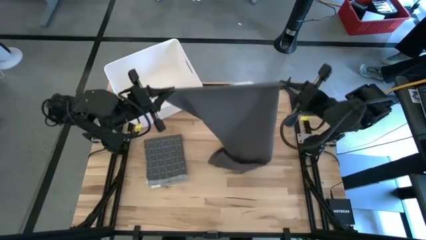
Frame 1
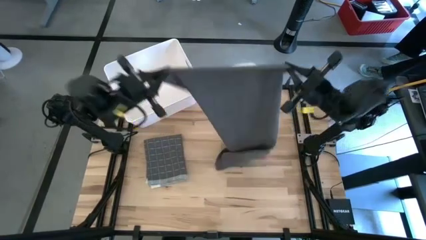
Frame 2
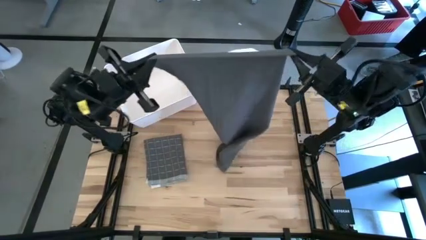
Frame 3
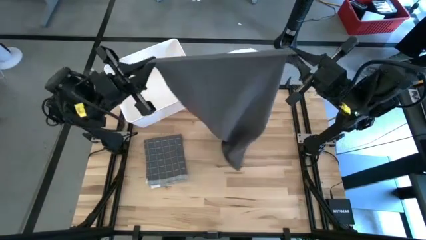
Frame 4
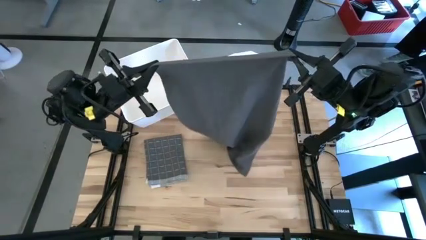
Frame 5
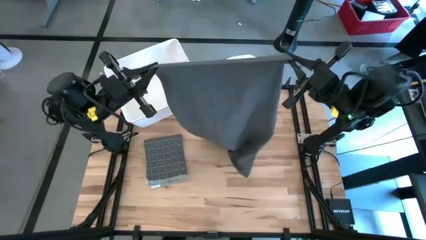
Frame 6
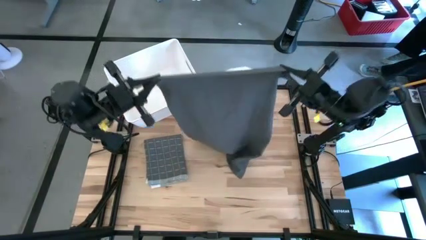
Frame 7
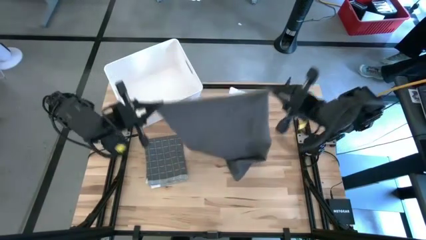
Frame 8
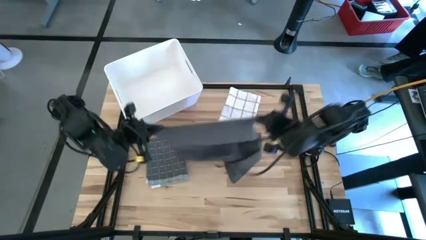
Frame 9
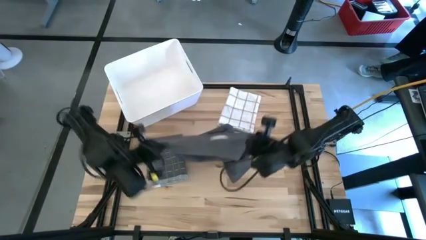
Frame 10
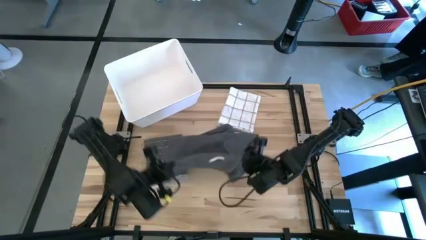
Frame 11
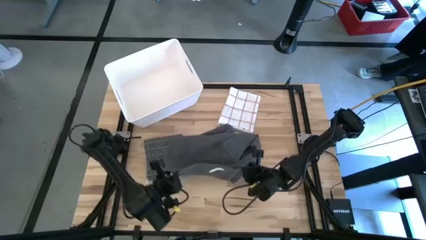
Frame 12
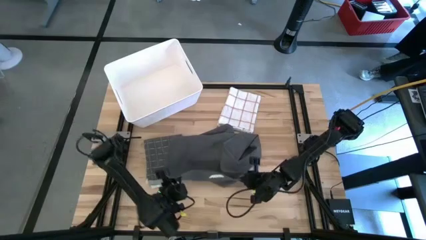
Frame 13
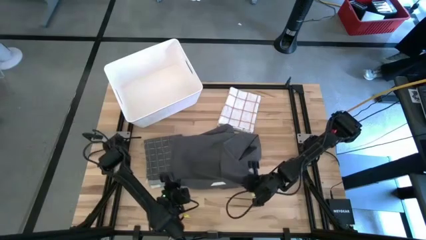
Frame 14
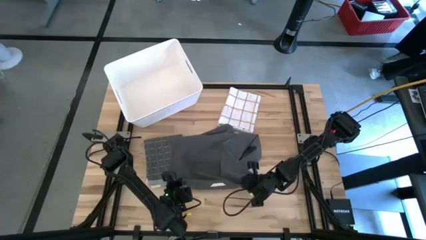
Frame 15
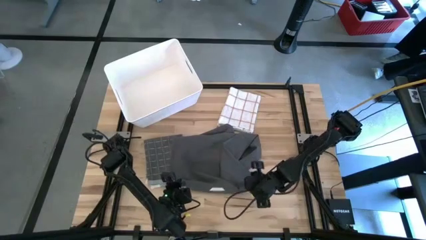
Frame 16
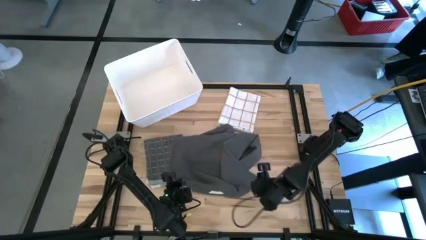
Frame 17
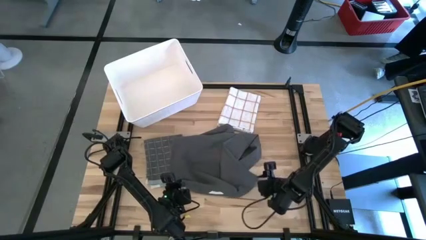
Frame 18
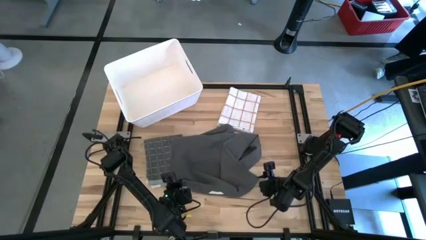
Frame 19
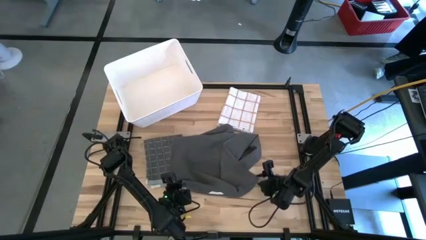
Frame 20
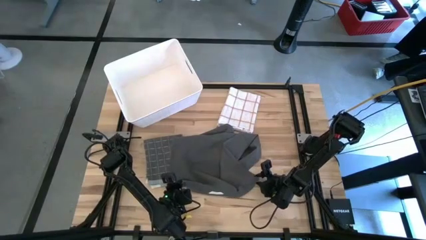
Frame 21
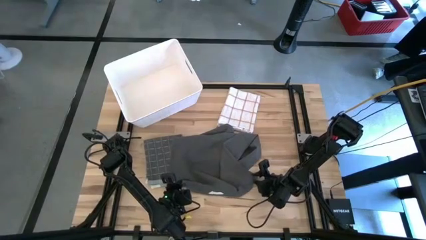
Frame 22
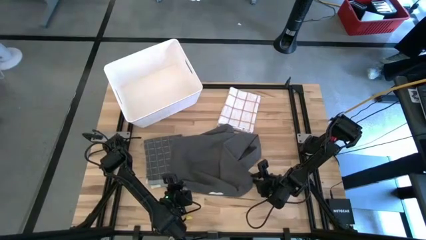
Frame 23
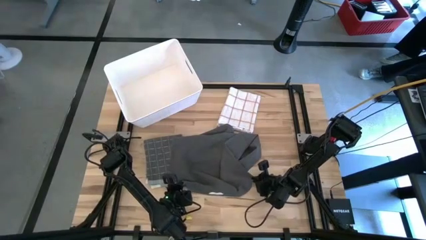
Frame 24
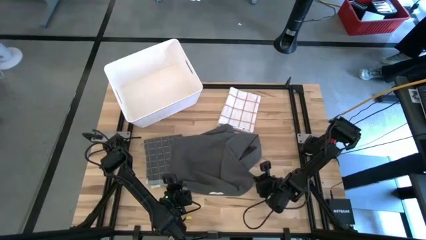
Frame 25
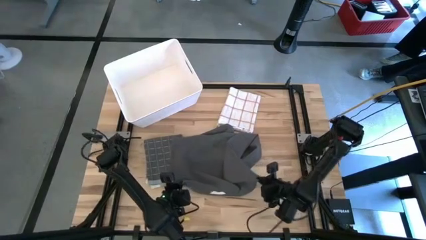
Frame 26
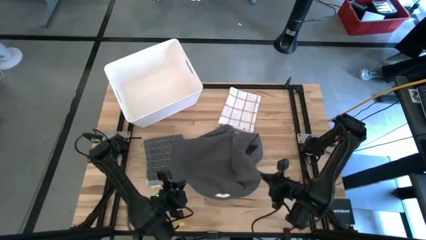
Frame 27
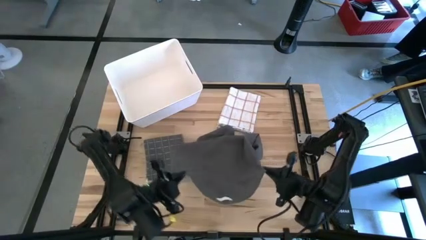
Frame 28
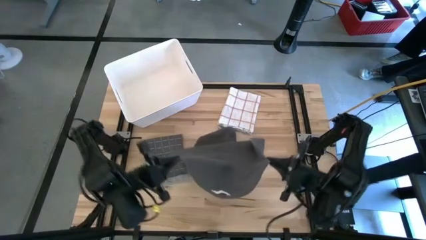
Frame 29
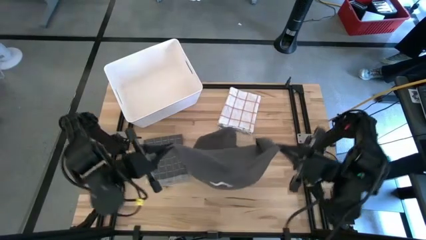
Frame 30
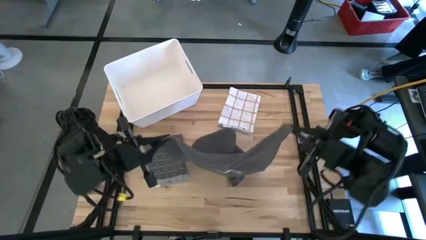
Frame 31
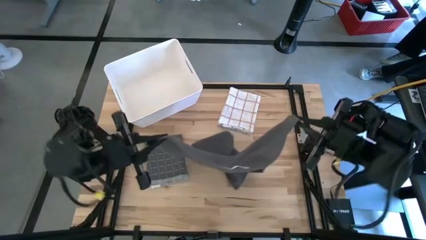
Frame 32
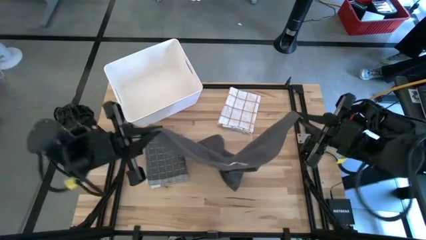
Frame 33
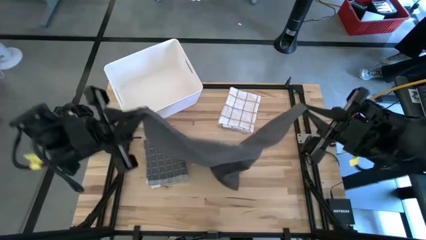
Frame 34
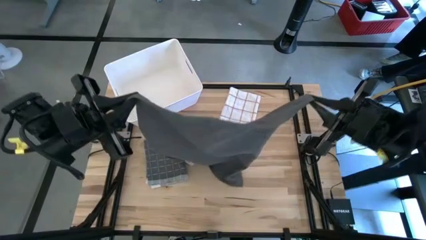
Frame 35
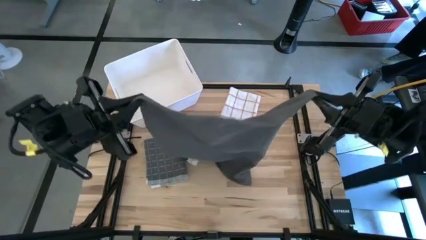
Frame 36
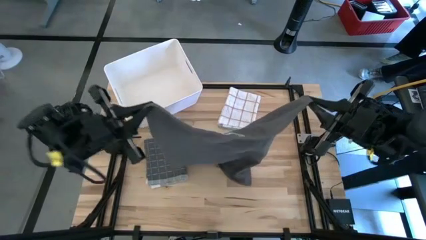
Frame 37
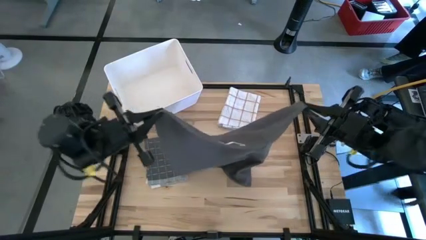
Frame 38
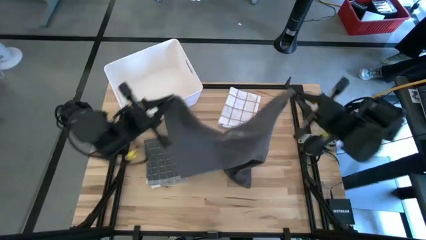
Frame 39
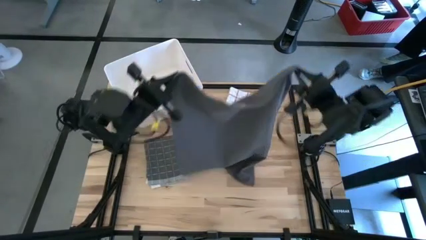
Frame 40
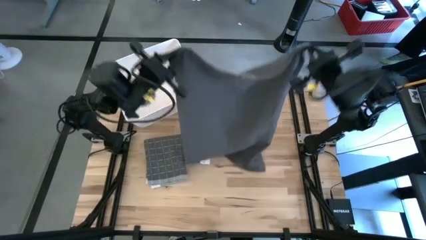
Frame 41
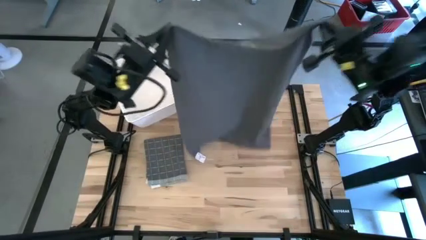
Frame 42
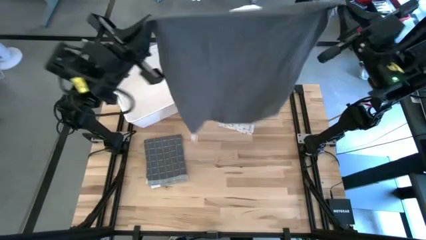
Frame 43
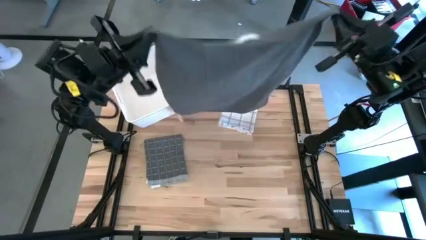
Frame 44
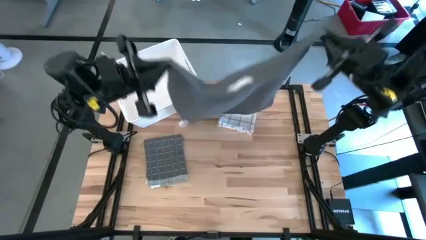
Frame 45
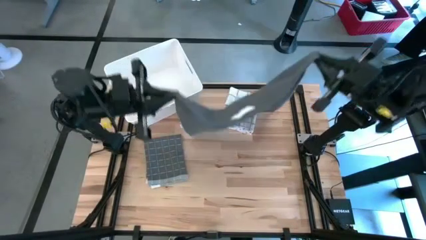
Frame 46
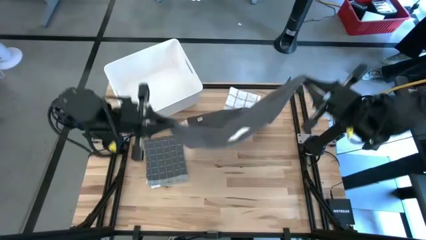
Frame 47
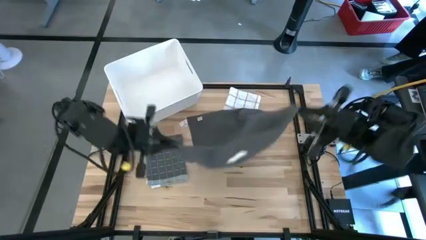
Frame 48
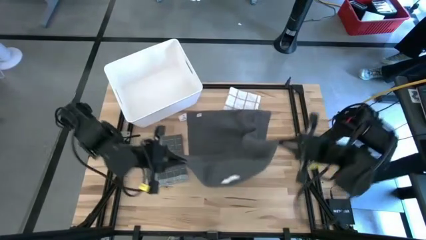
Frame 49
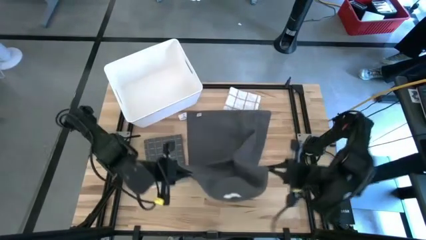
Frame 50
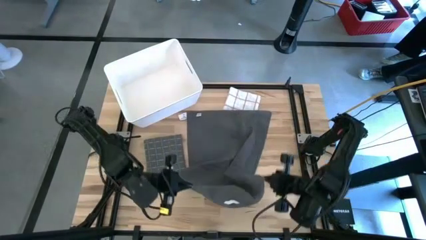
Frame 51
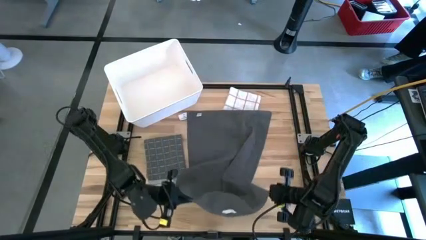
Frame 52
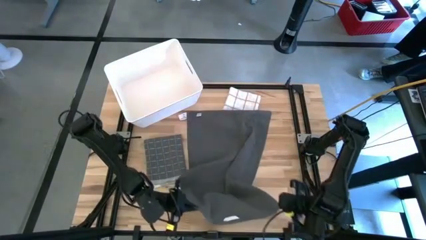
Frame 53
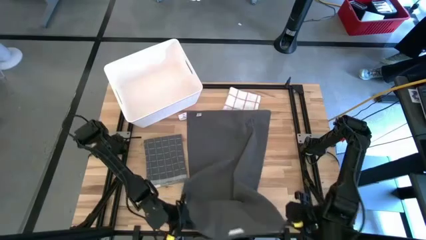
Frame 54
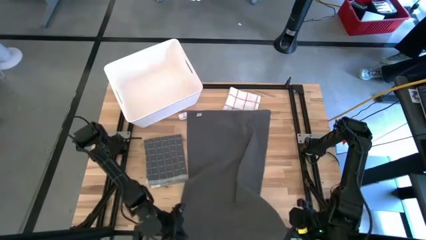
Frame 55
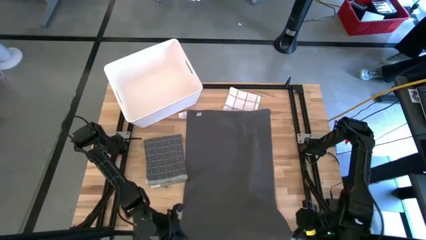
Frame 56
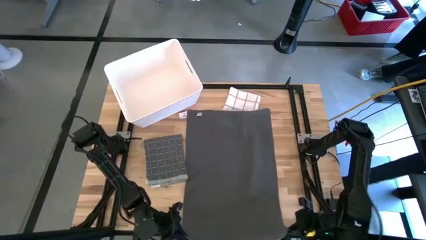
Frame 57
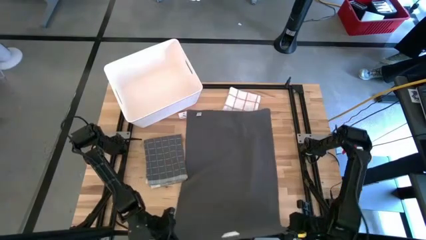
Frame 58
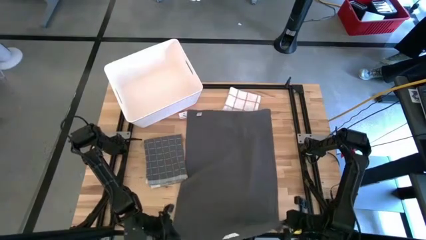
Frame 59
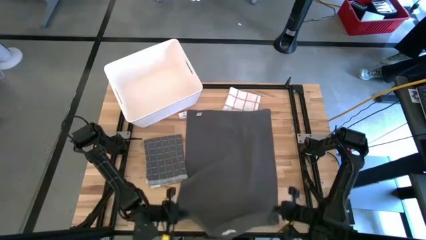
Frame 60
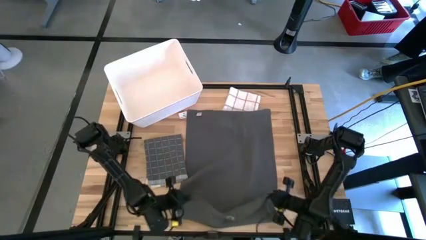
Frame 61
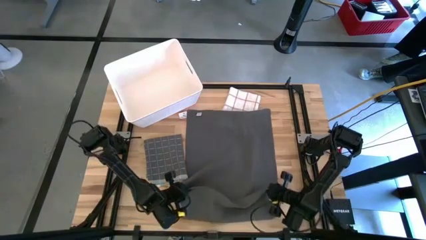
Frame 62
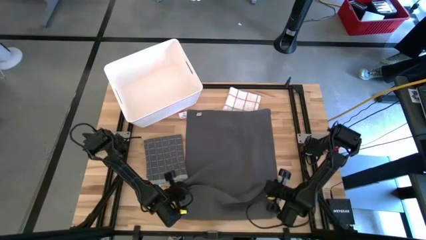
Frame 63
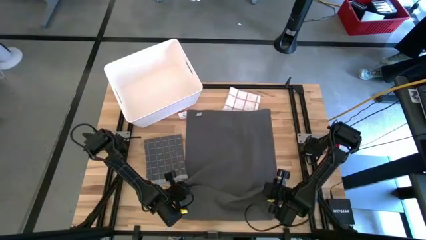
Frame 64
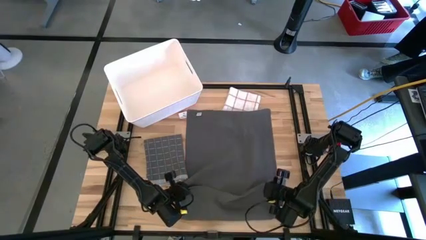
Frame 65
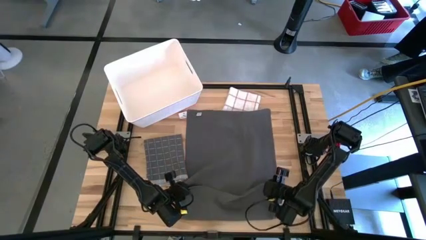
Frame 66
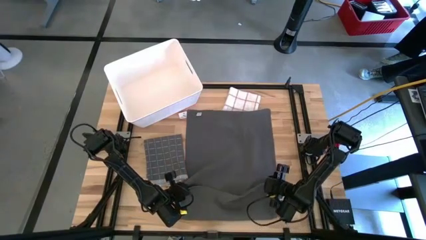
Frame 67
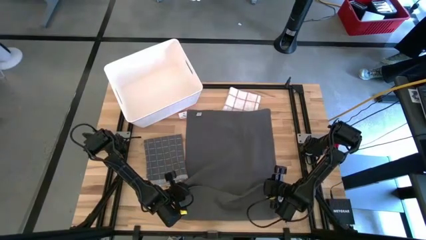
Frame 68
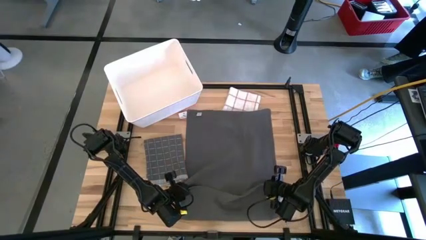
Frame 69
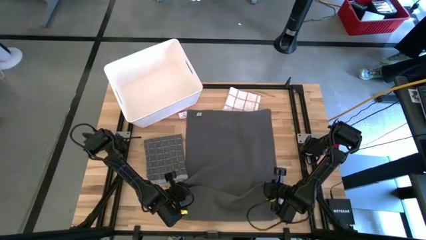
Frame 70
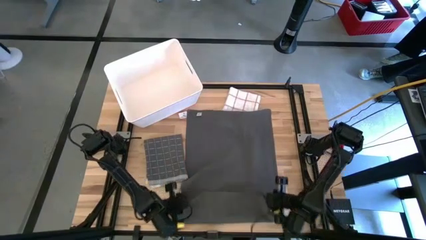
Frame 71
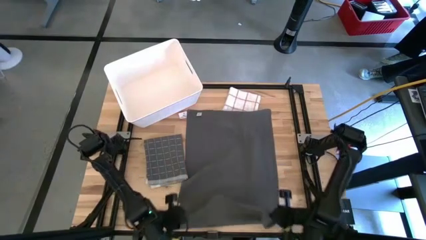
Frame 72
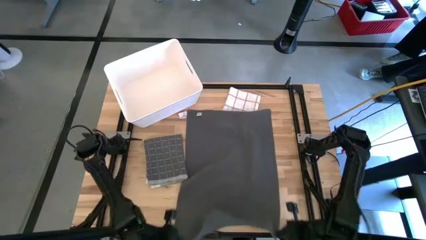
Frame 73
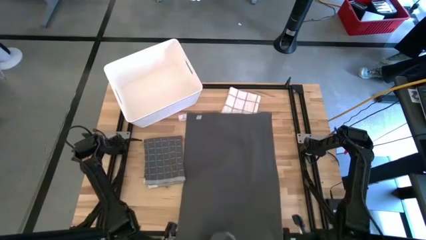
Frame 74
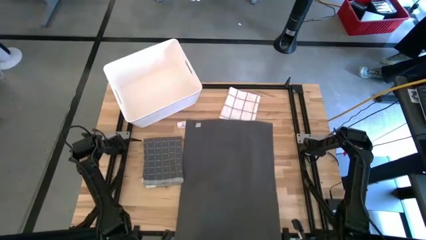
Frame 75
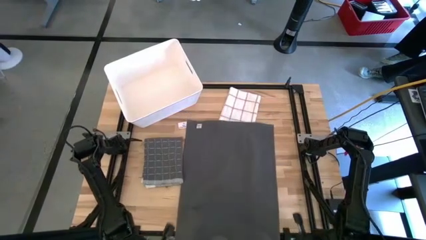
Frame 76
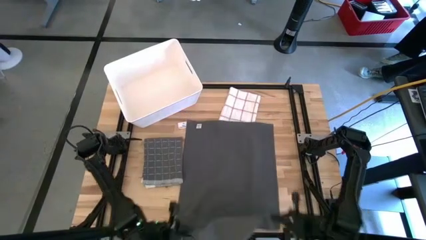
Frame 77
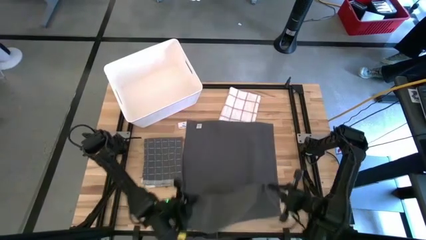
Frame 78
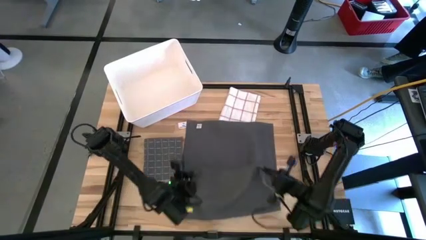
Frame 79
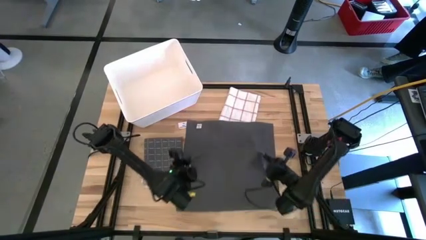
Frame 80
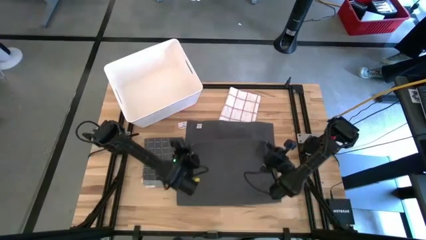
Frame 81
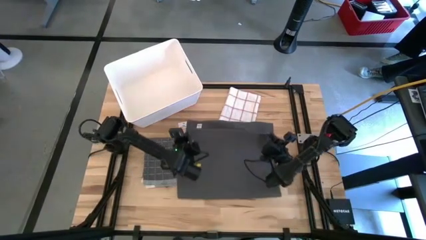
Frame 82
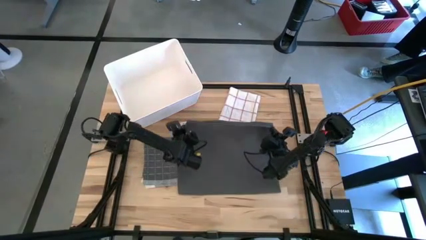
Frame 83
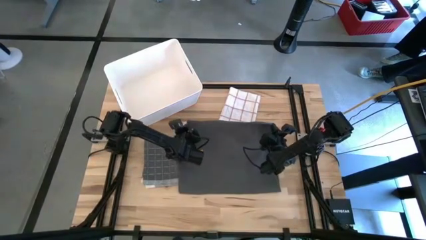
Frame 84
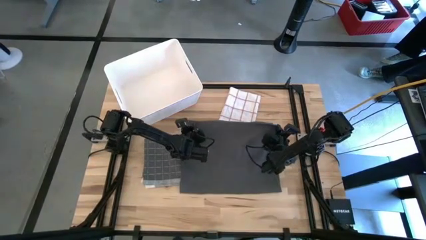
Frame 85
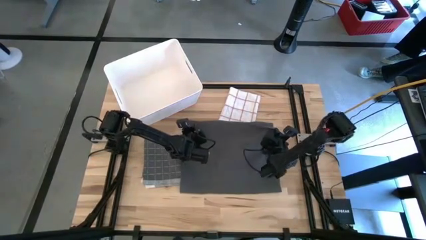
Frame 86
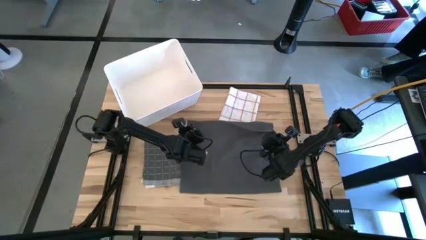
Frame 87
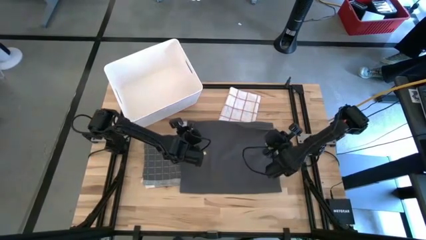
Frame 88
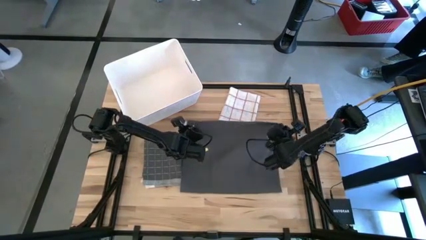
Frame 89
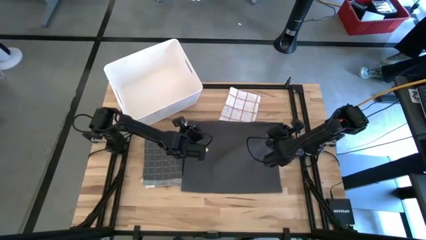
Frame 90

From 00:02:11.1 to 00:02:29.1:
Task: Fold towel
Fold the gray towel
